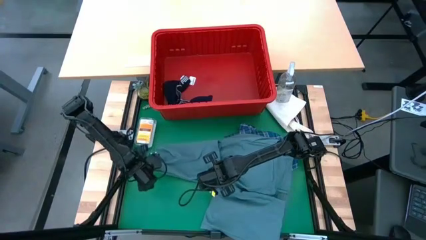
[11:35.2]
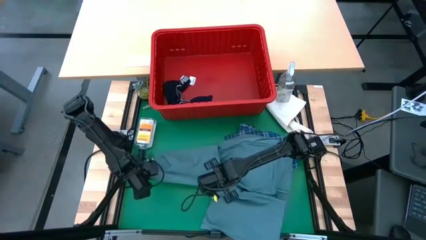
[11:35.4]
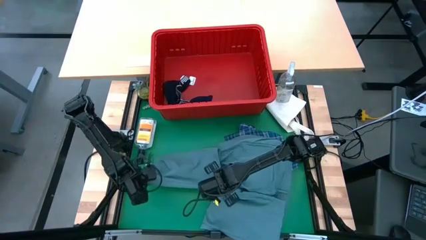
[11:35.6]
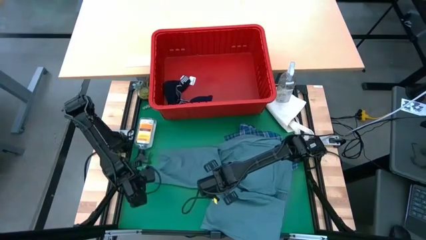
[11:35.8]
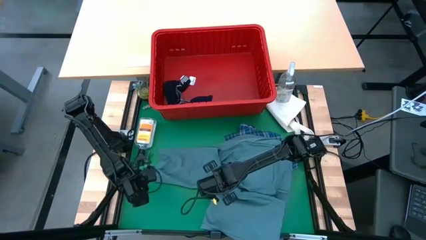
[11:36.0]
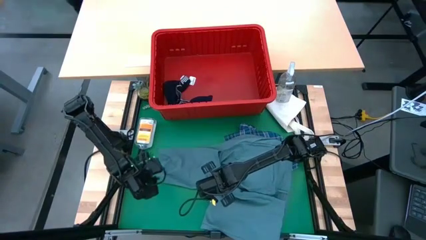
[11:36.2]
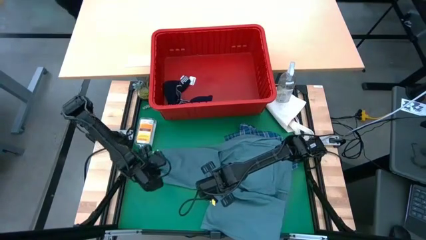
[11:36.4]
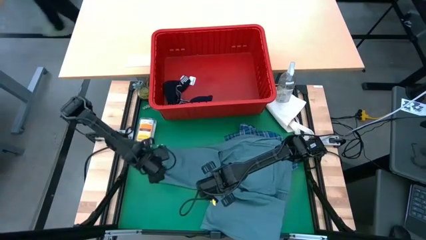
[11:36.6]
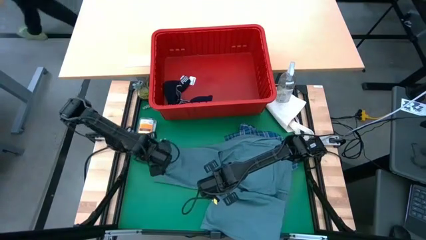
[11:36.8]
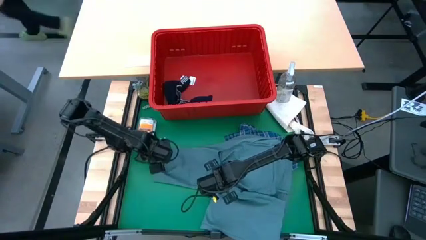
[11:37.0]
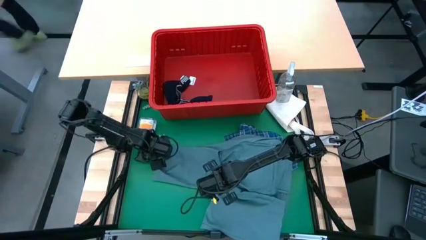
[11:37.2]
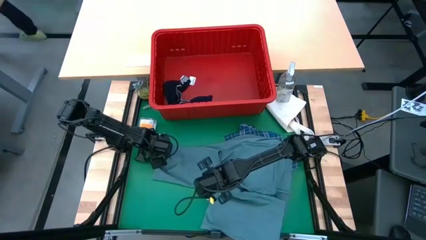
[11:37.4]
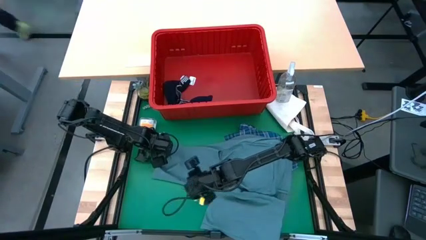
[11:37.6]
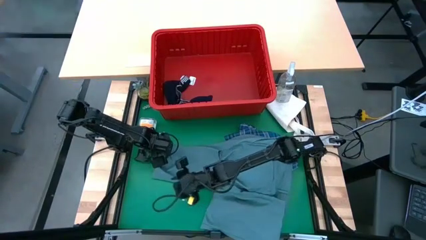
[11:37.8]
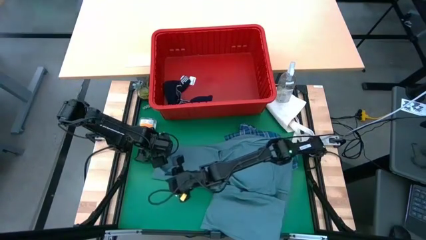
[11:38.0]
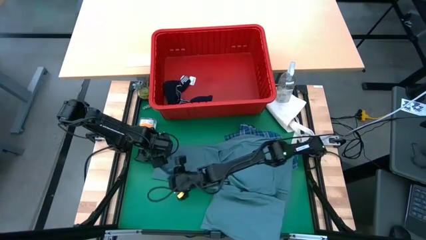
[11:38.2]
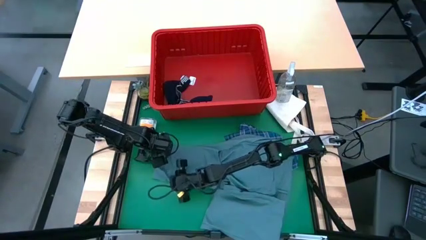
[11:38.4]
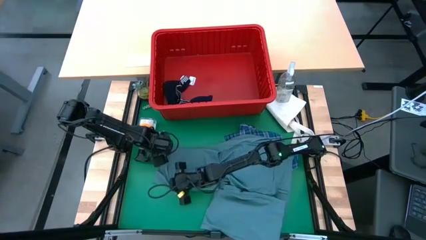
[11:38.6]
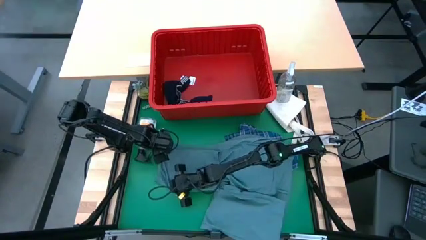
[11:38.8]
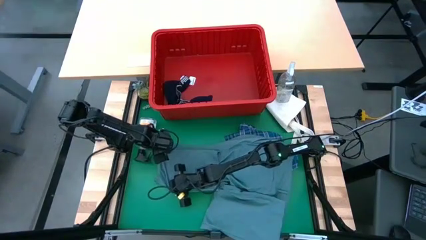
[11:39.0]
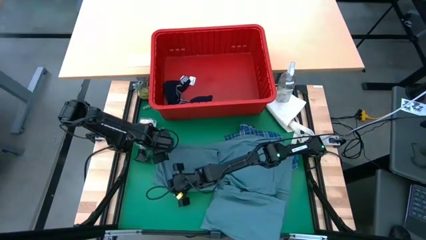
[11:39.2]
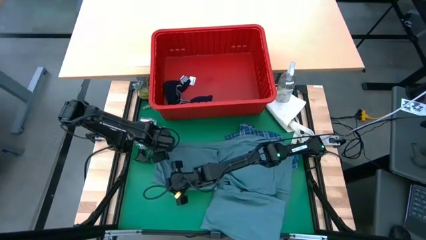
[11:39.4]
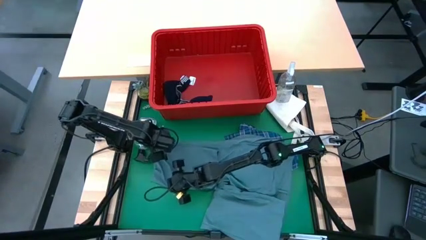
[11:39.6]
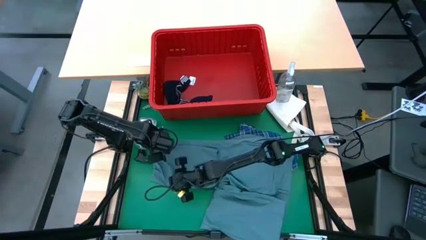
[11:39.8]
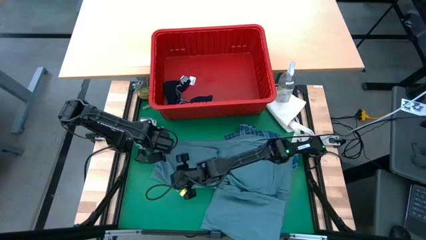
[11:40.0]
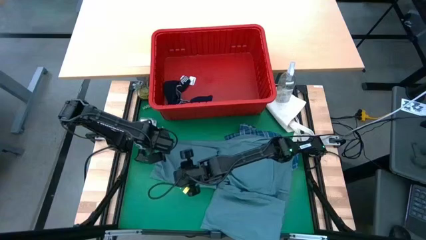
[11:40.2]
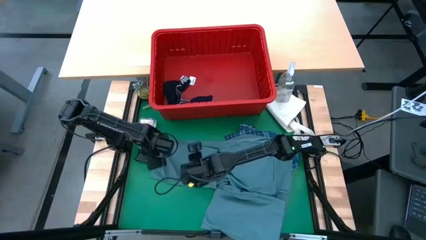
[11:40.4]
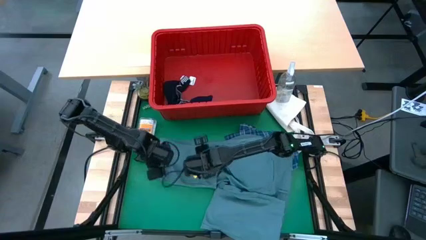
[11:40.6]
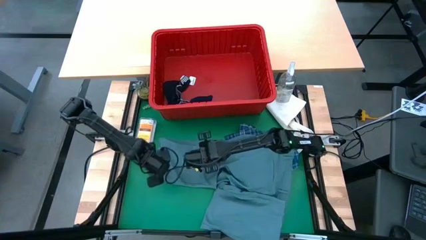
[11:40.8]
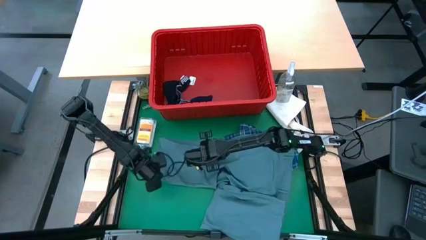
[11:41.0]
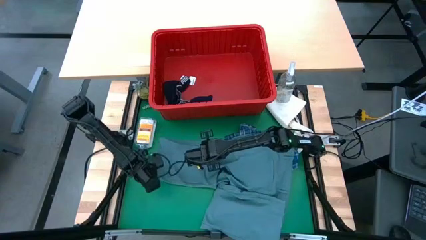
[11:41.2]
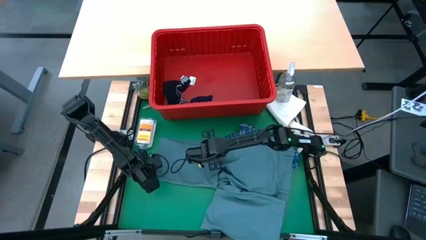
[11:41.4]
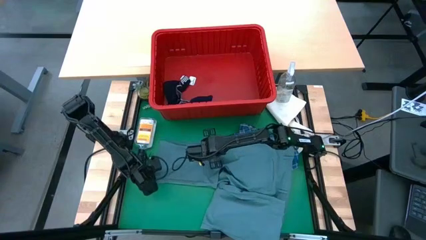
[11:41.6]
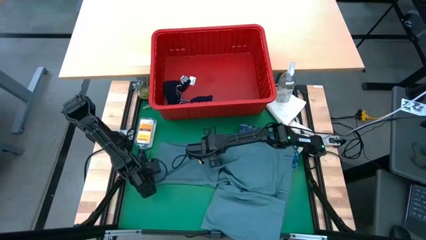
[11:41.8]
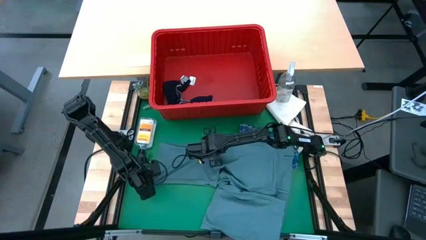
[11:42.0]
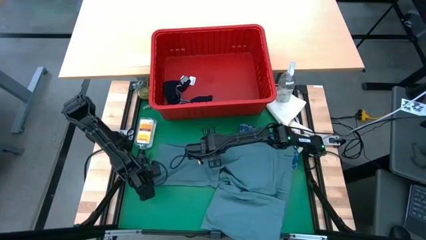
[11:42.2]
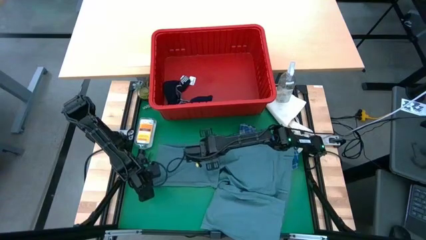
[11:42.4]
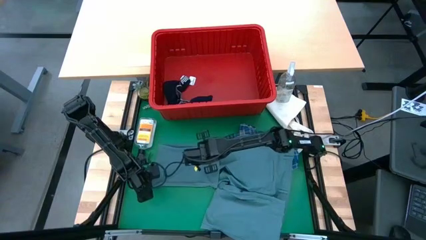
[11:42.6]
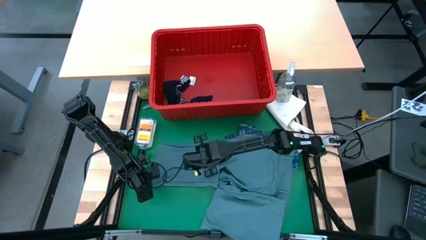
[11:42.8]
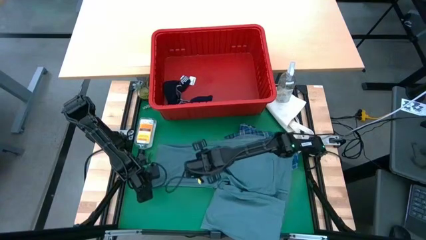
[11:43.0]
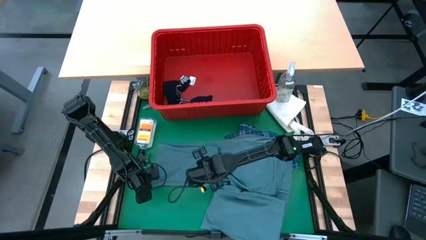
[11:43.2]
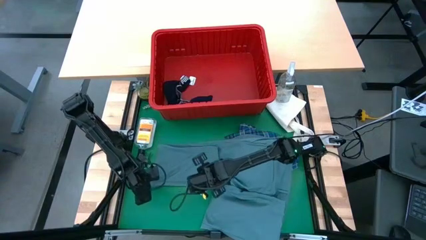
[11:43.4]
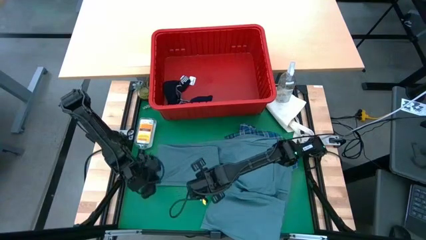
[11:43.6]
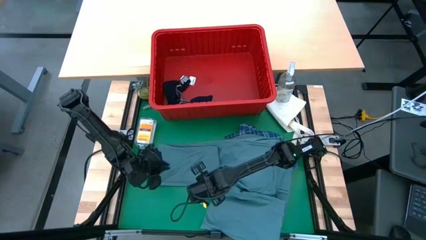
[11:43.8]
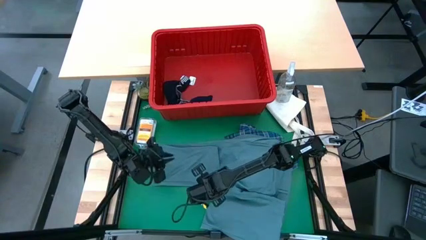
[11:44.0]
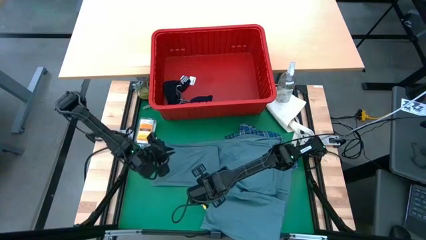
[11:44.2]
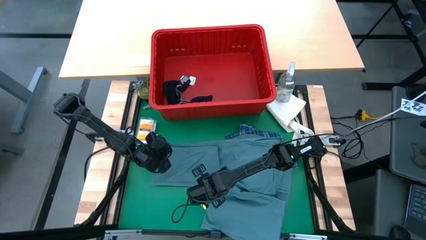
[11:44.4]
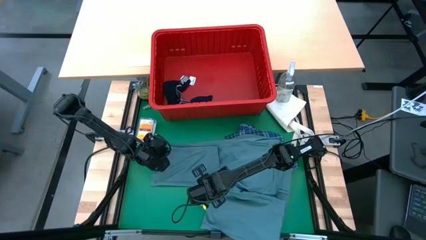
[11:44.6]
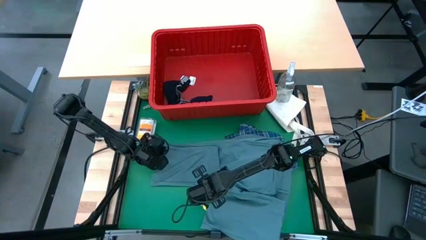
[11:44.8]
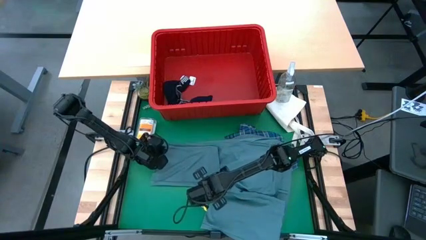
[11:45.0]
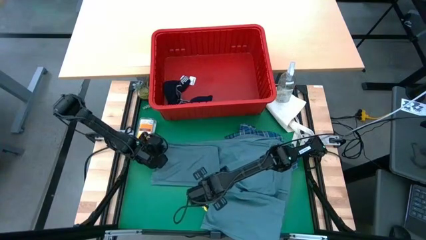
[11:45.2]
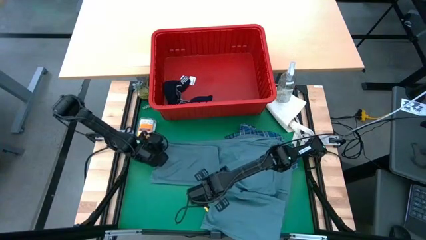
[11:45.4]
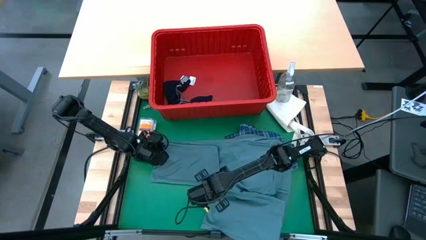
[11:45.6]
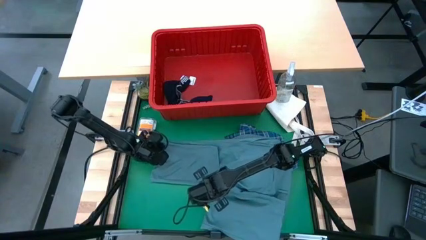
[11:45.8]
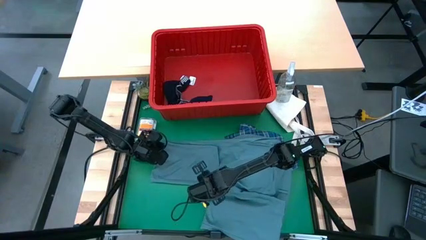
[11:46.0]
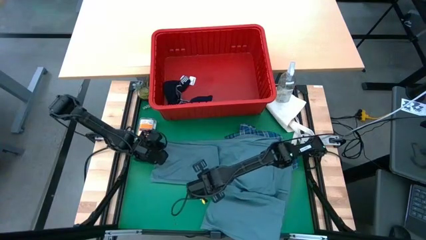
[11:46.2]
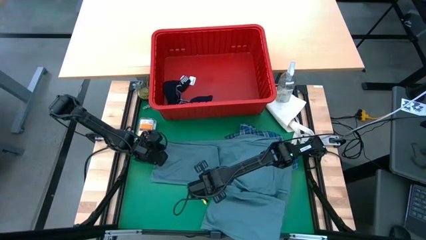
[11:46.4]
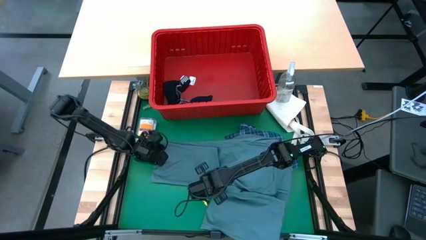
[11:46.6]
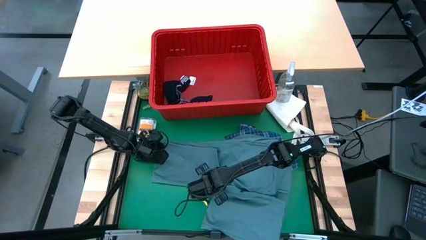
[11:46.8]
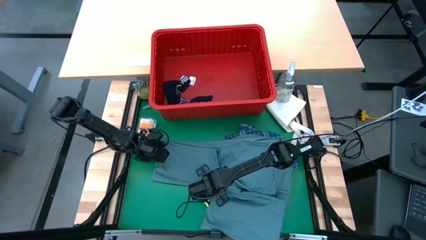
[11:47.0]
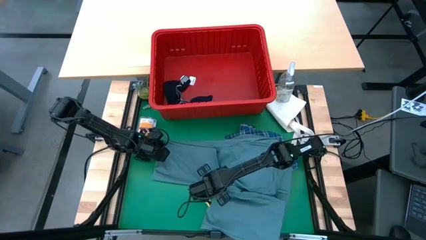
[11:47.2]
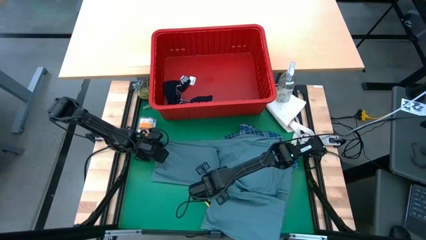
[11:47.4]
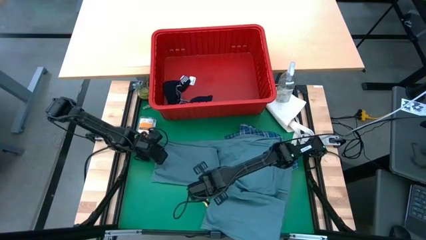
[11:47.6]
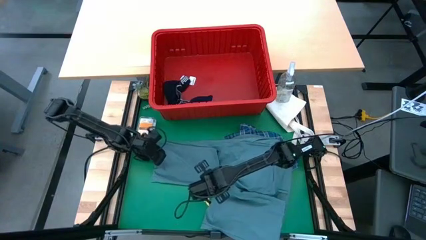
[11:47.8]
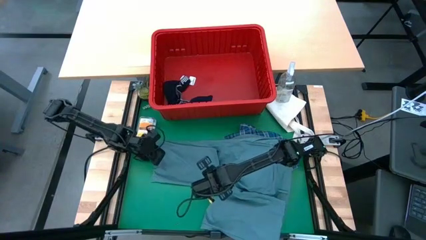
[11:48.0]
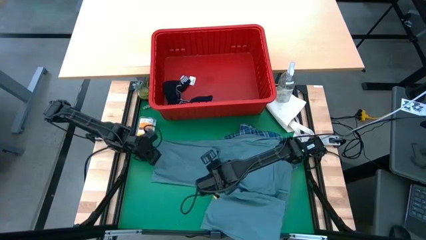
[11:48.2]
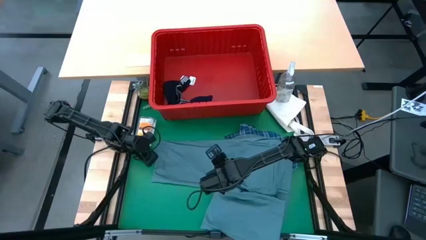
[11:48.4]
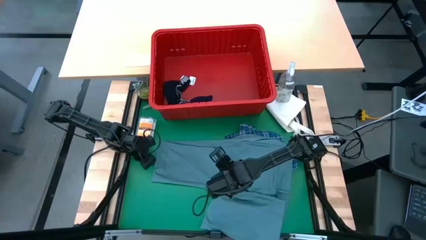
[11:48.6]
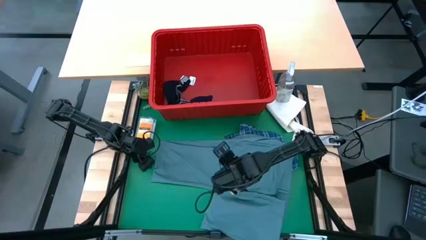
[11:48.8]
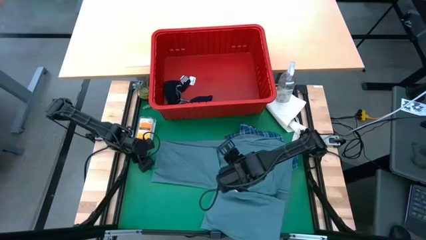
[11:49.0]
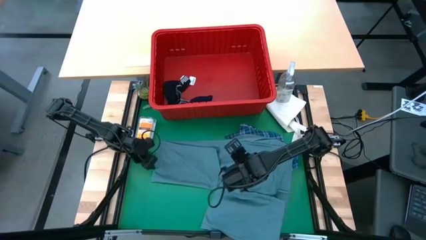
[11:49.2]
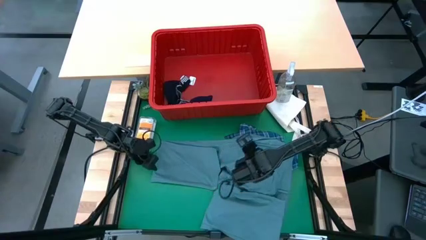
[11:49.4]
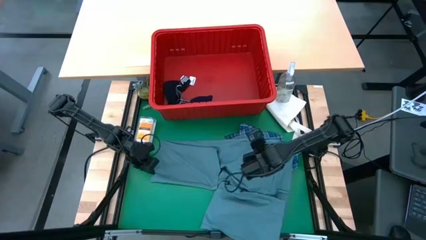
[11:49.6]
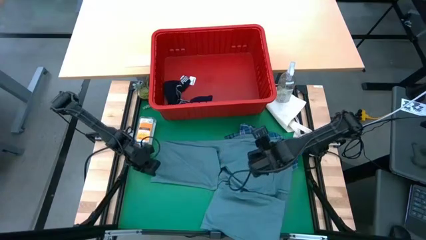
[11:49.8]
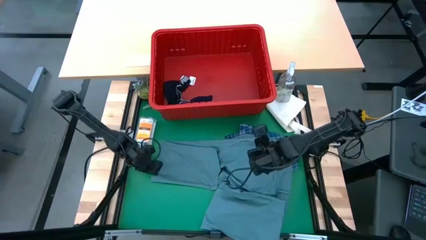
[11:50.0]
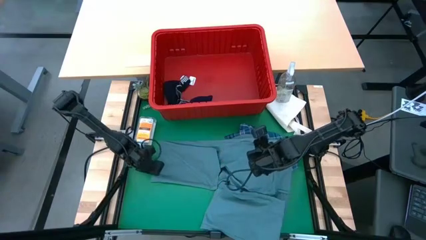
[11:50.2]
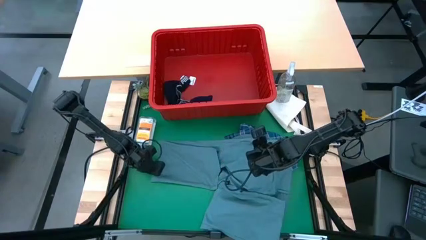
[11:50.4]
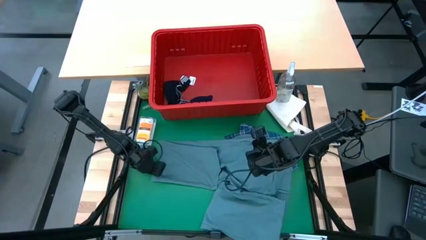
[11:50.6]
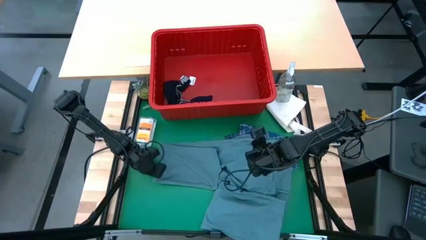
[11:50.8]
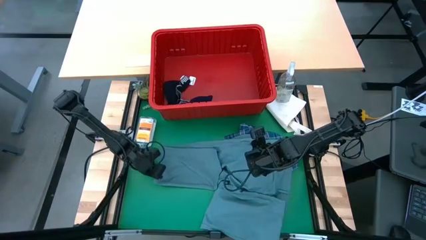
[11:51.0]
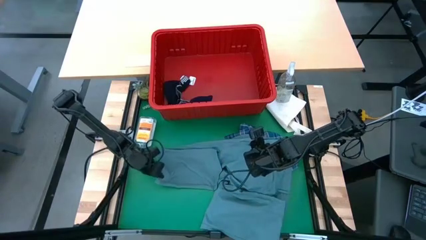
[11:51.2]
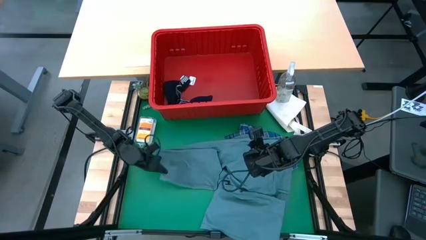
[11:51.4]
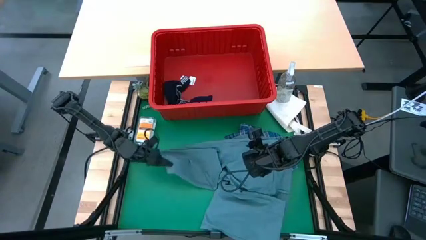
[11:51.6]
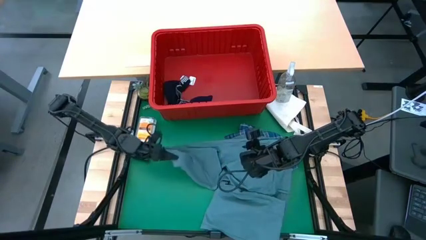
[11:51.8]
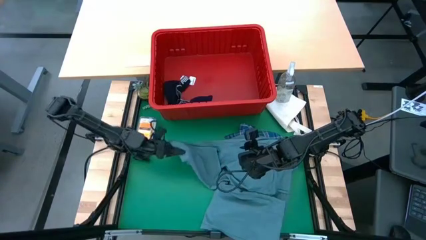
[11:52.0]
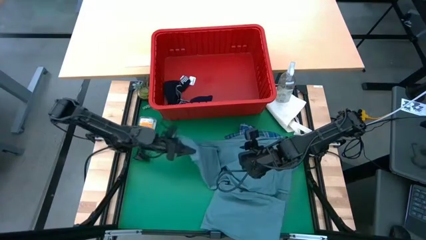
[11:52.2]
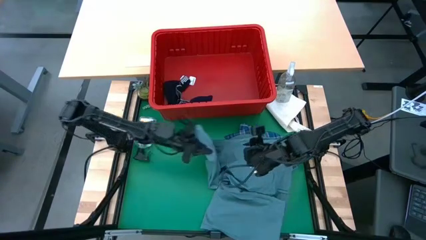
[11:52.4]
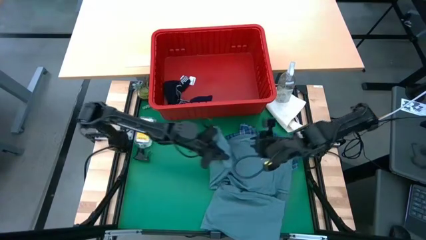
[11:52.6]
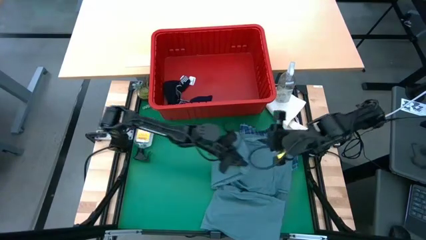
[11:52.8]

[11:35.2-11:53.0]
Task: Fold Laundry from Bin
Fold the blue pants on top of the blue shirt
